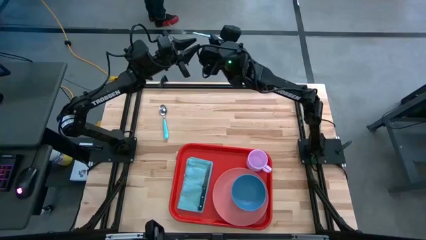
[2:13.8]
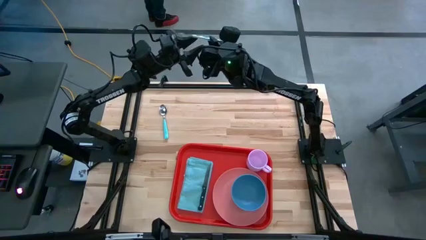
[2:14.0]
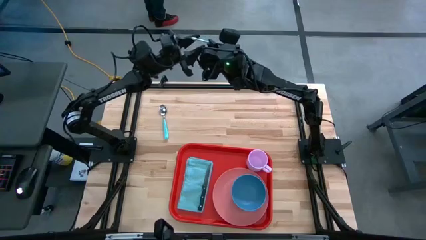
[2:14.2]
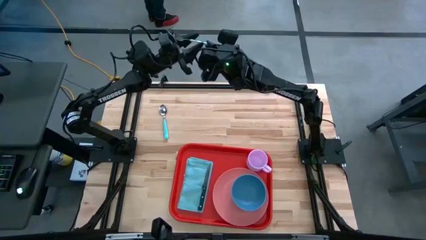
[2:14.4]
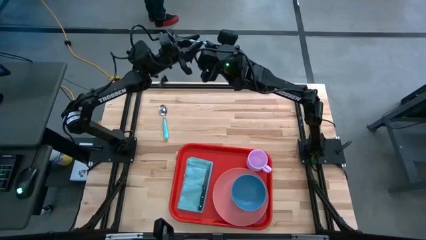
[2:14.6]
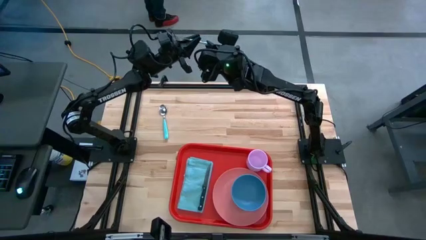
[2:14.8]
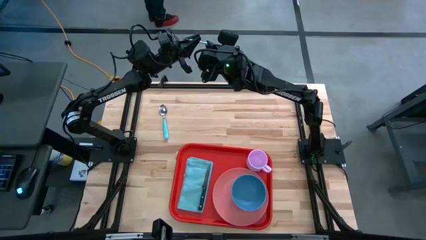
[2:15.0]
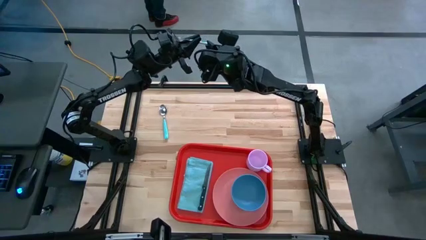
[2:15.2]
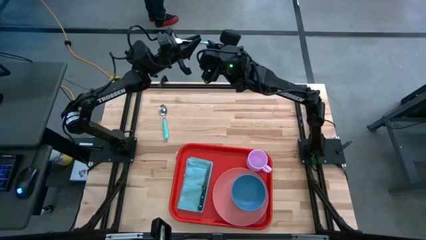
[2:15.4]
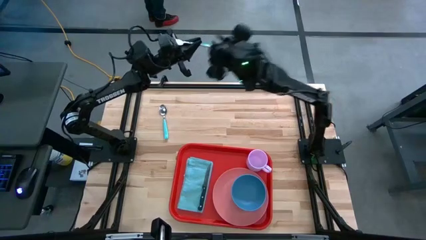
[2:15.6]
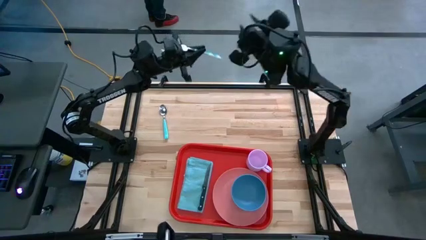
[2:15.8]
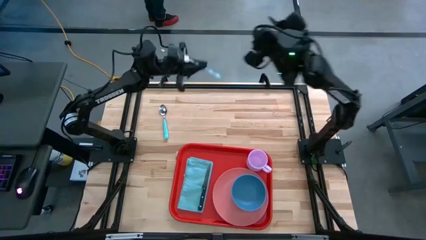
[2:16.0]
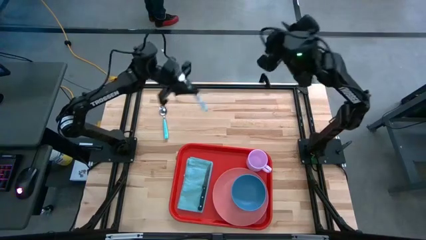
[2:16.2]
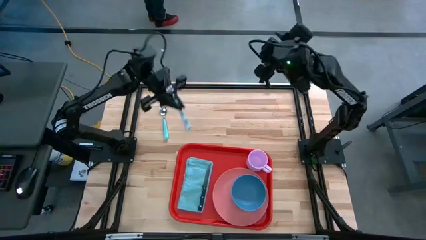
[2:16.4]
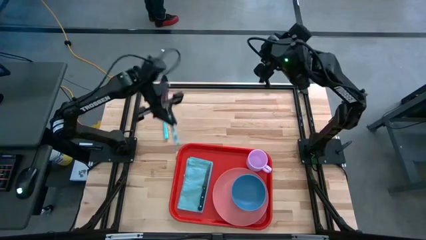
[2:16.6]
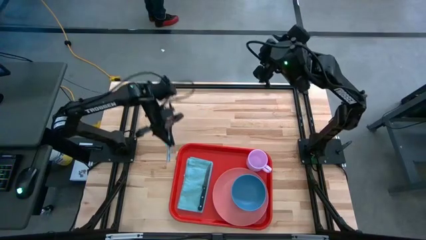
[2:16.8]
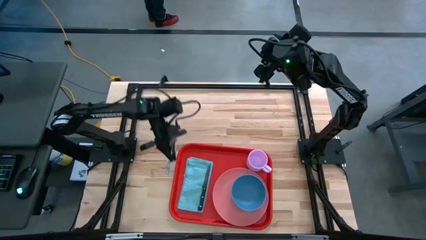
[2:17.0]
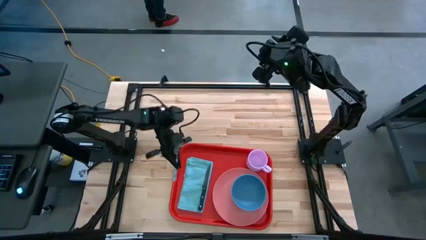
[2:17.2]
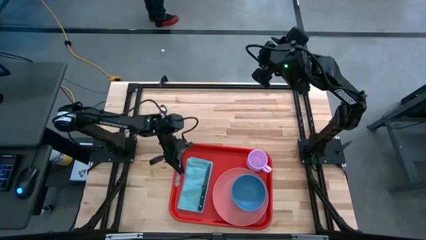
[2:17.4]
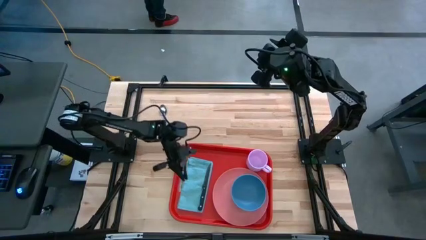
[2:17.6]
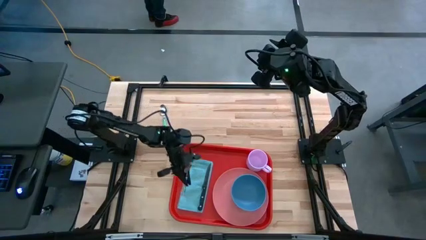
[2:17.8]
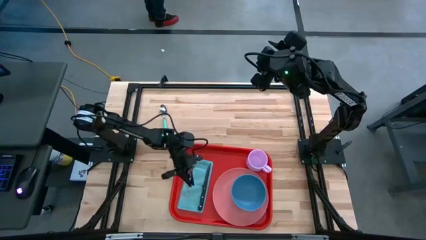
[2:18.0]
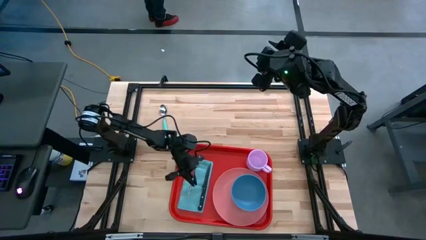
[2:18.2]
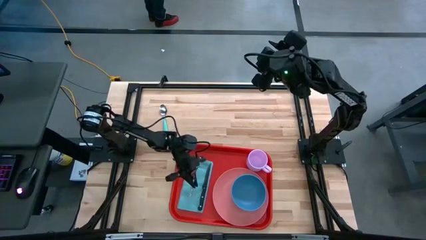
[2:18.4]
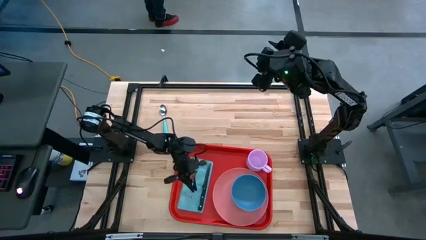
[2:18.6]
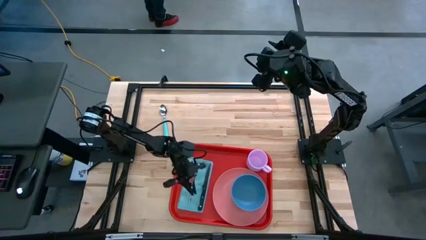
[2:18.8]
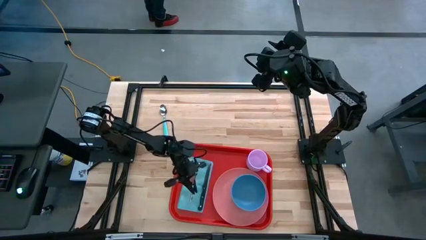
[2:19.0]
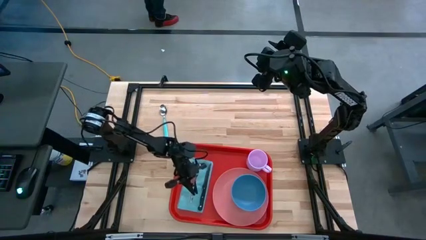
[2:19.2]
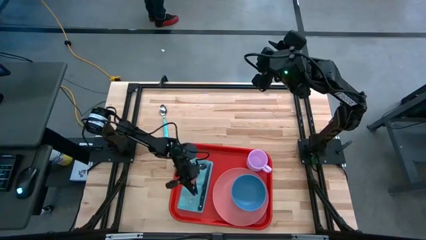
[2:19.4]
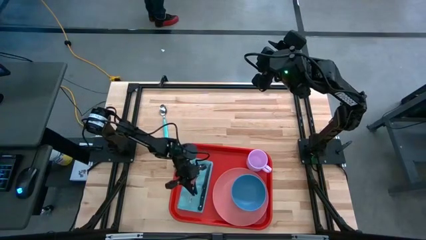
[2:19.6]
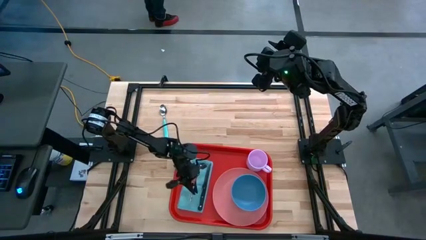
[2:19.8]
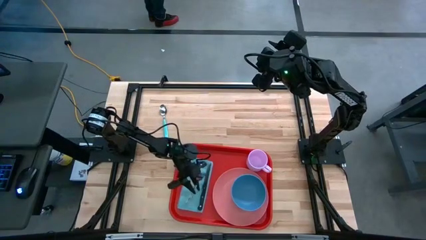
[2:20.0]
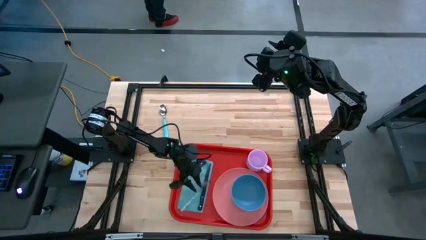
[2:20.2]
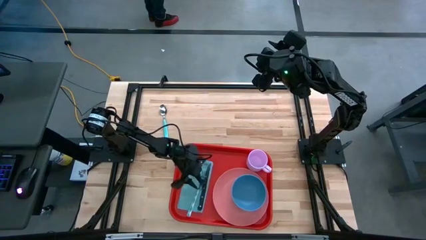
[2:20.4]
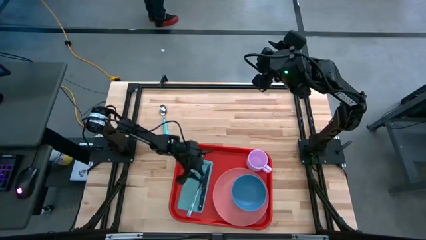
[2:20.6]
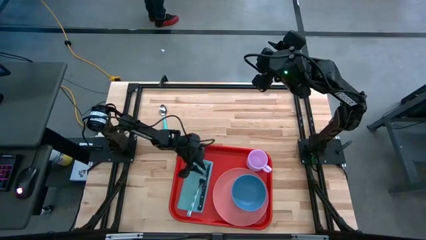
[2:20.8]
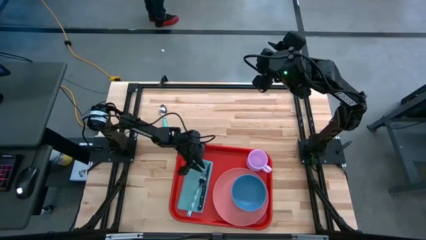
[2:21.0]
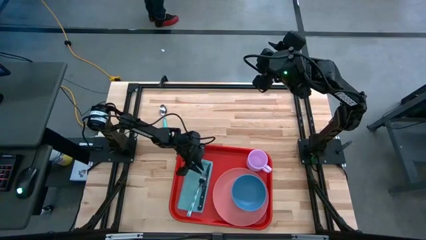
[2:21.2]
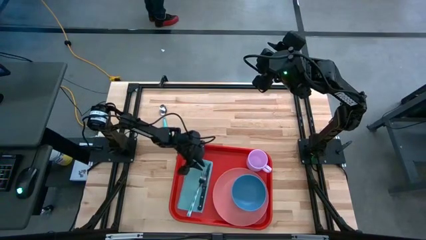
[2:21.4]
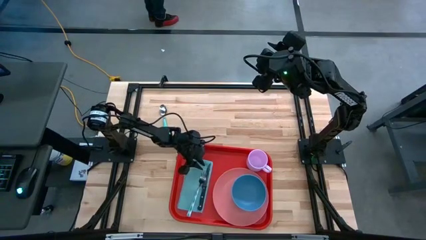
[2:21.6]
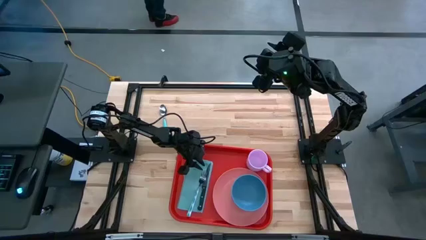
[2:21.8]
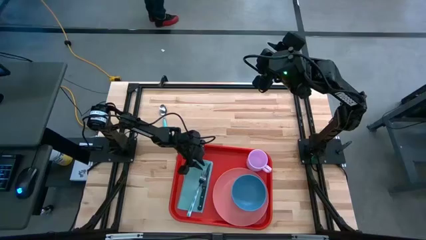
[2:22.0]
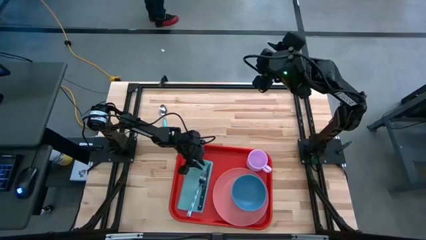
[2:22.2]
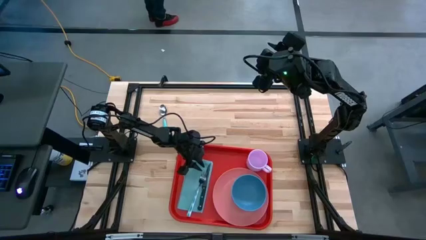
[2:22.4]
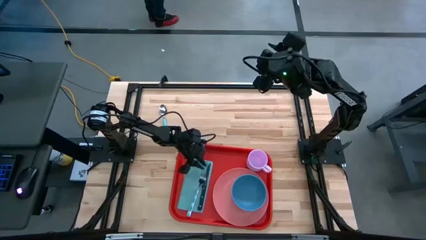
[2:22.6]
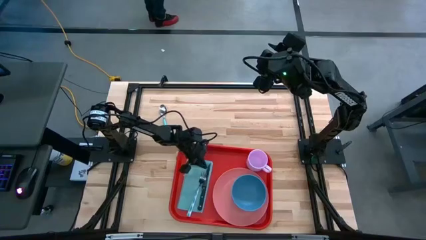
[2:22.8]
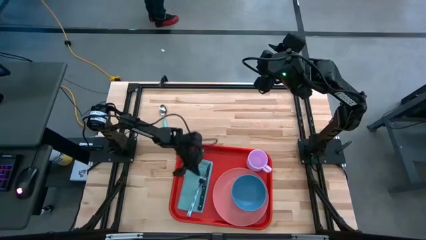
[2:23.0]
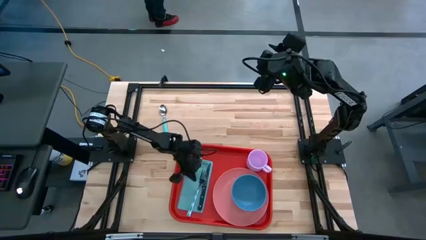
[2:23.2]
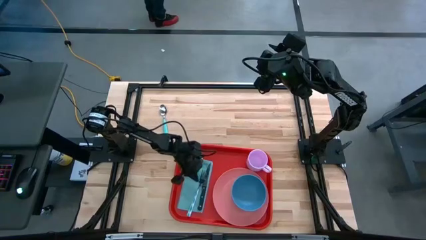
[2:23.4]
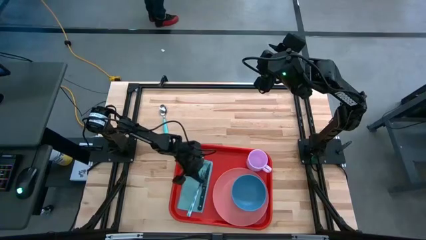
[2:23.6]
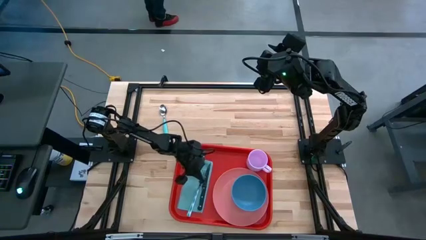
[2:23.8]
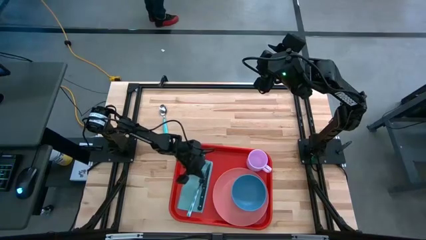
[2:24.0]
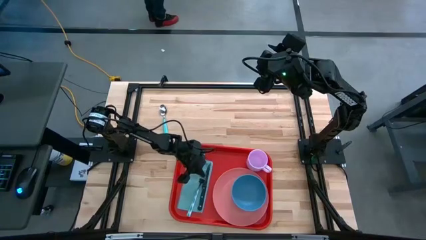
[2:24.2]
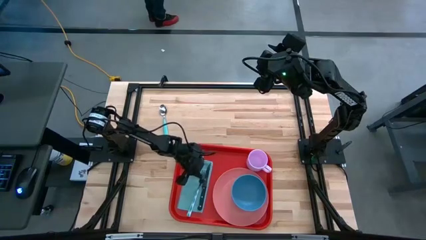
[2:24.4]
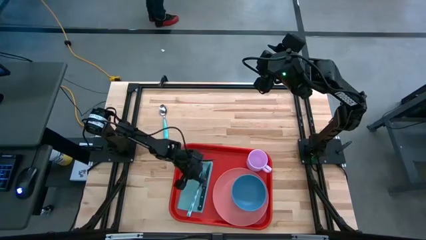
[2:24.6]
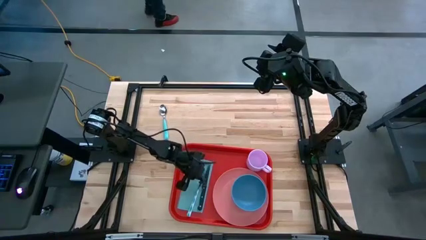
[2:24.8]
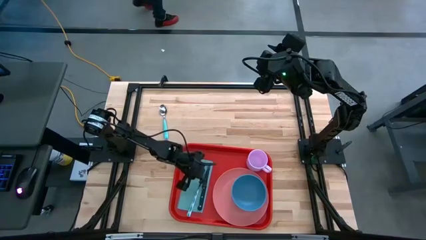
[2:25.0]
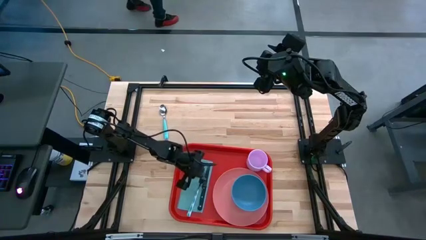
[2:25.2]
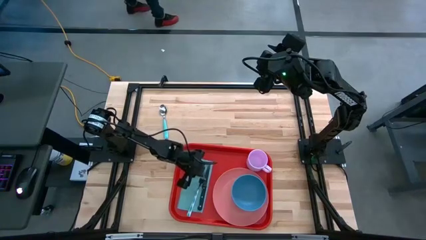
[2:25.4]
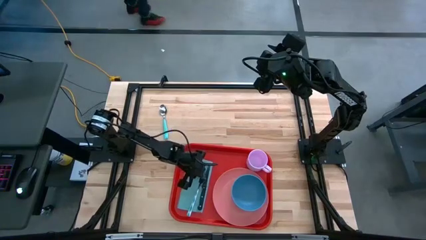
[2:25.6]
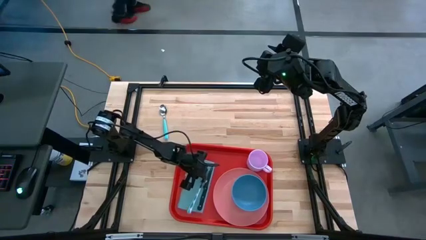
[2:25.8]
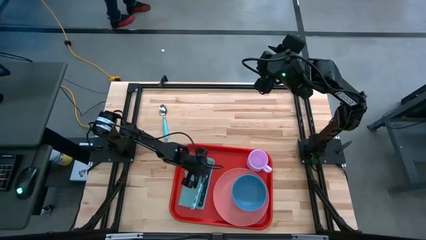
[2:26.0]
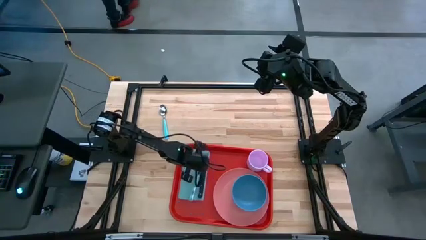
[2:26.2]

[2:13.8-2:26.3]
Task: Set up tray
Put the blue fork on the blue table napkin to the left of the black table knife

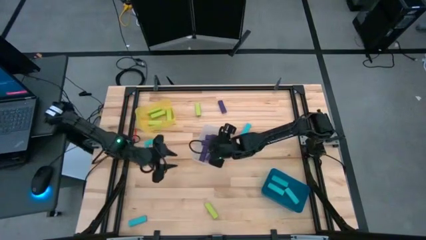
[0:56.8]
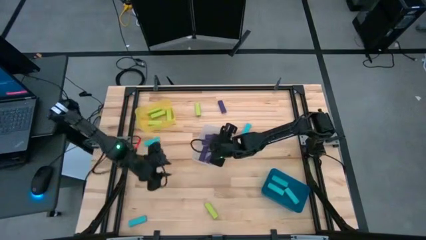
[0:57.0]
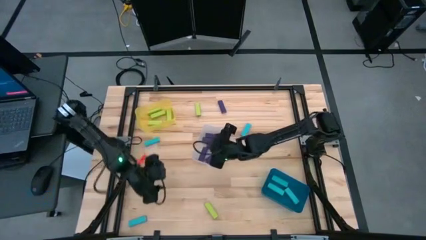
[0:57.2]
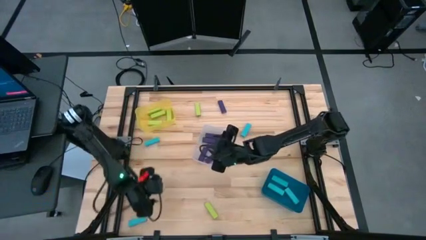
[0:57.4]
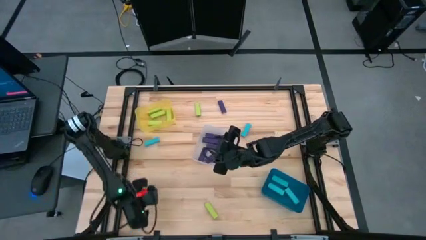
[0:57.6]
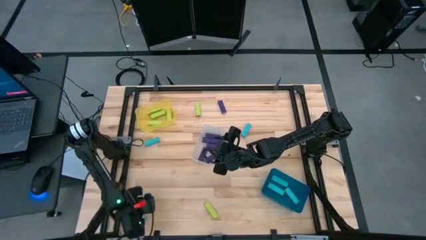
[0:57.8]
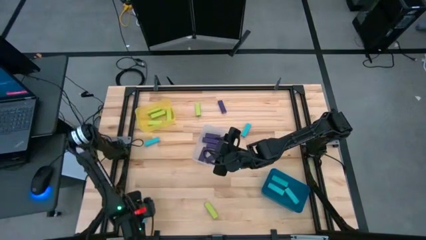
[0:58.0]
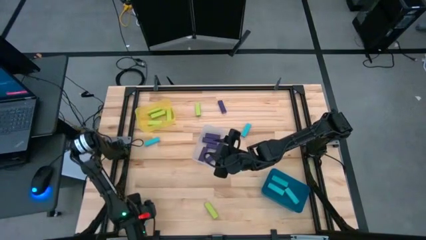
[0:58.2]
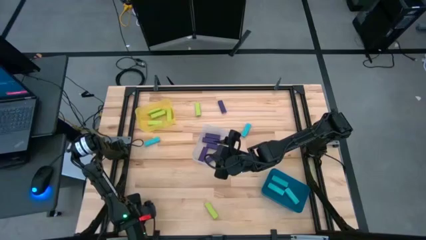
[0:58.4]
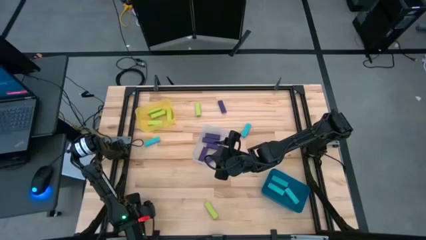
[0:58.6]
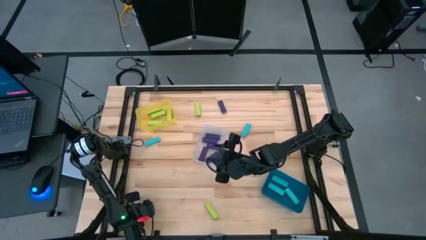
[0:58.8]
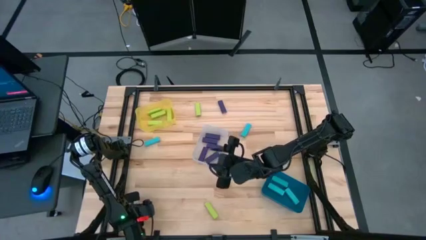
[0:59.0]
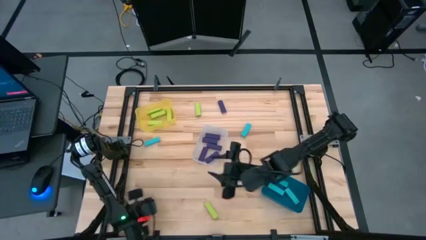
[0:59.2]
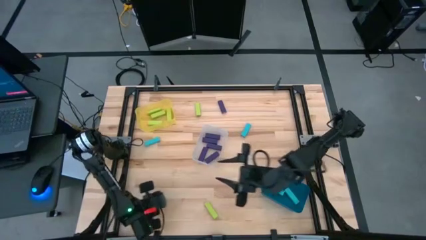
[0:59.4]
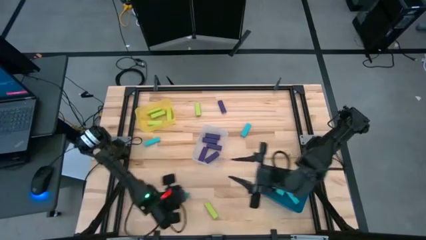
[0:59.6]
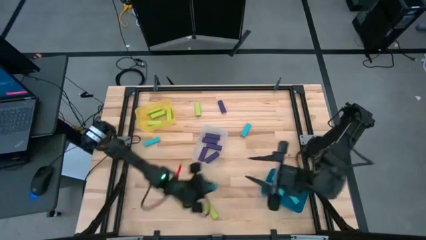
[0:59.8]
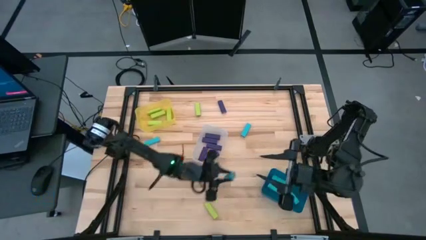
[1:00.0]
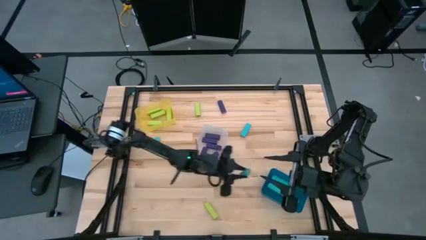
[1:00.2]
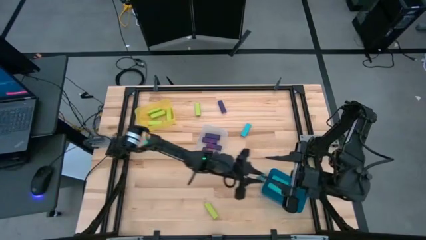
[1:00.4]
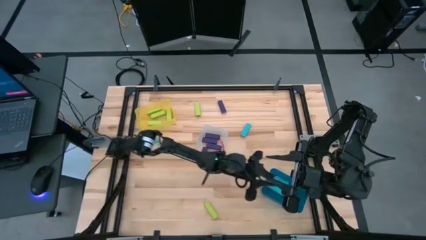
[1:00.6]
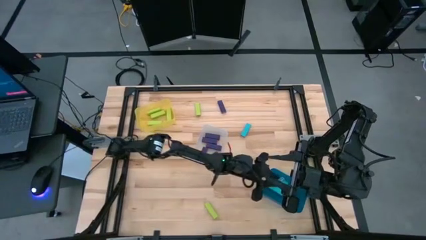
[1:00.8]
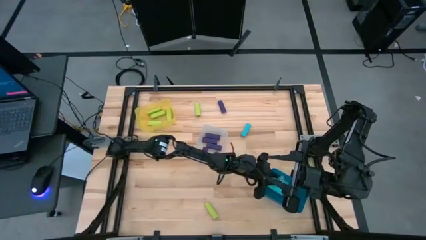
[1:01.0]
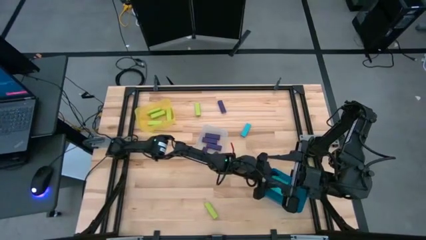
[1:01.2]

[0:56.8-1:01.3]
Task: Sort blocks
Put the bottom blue block into the blue bin
